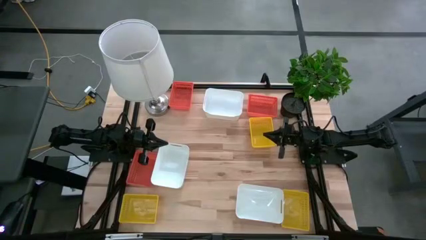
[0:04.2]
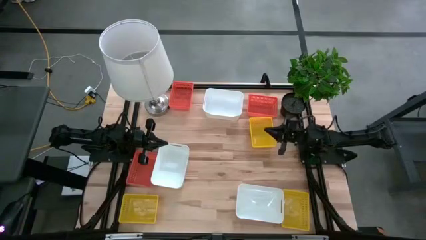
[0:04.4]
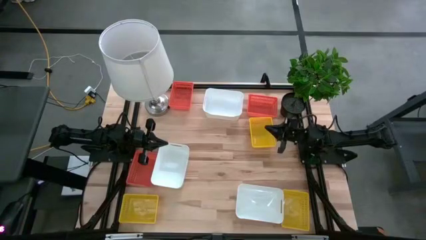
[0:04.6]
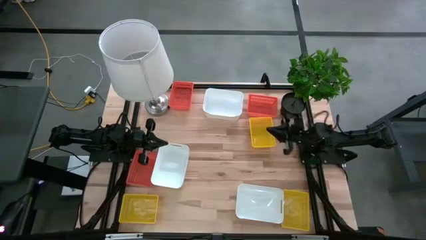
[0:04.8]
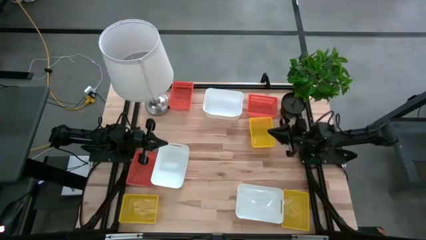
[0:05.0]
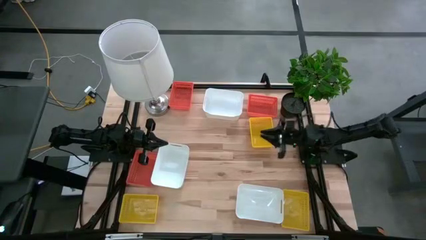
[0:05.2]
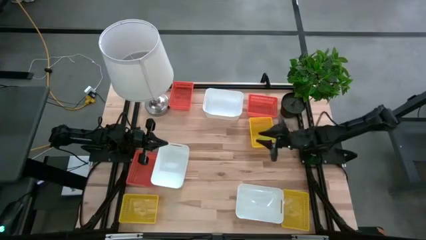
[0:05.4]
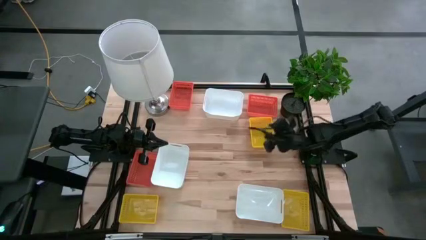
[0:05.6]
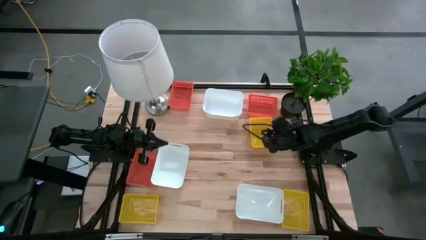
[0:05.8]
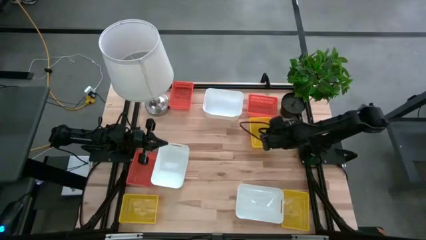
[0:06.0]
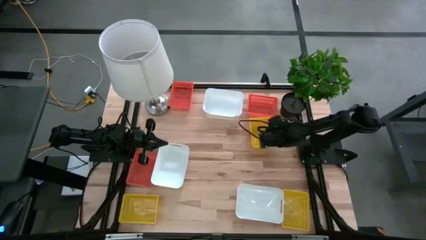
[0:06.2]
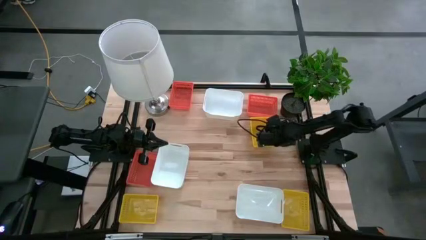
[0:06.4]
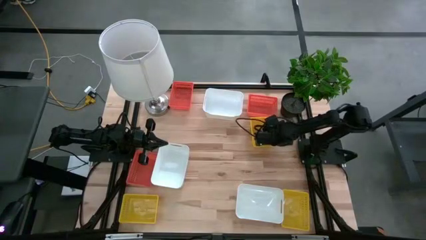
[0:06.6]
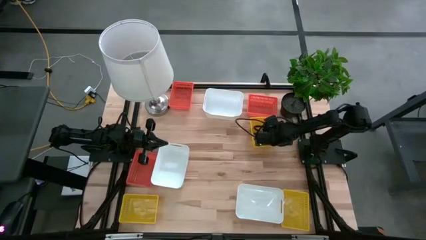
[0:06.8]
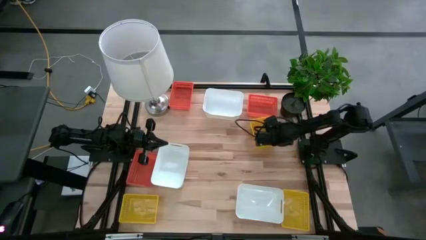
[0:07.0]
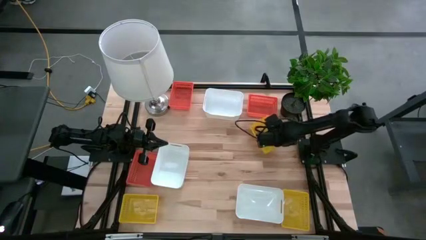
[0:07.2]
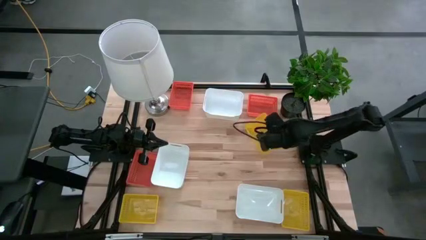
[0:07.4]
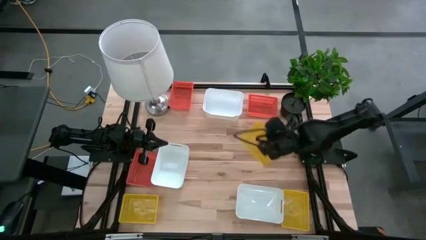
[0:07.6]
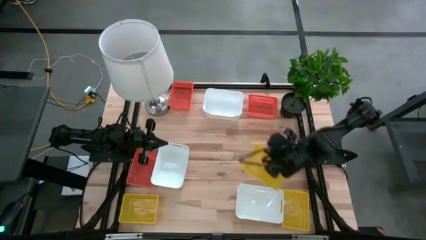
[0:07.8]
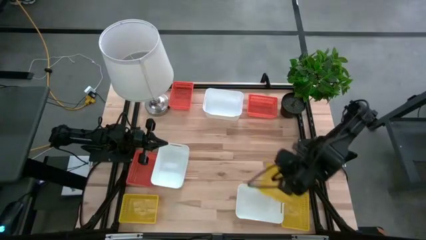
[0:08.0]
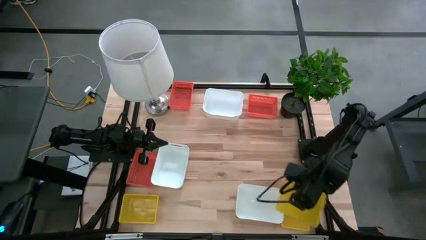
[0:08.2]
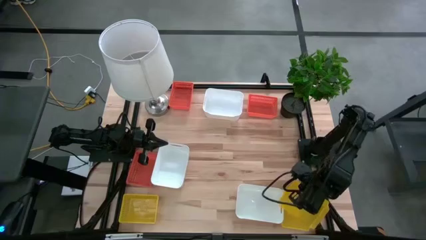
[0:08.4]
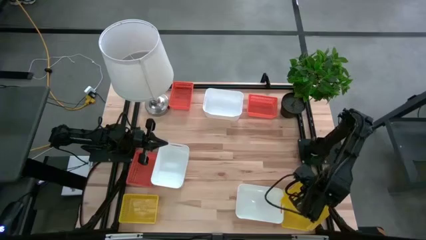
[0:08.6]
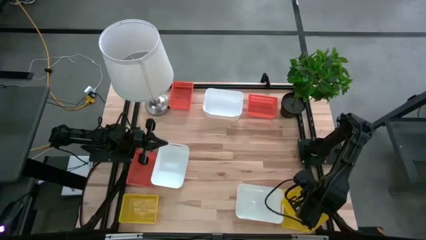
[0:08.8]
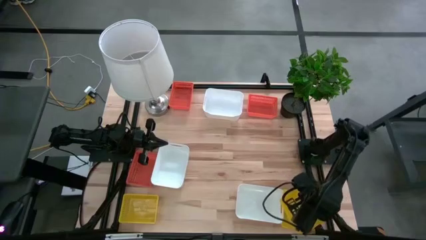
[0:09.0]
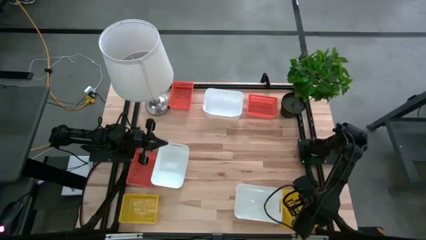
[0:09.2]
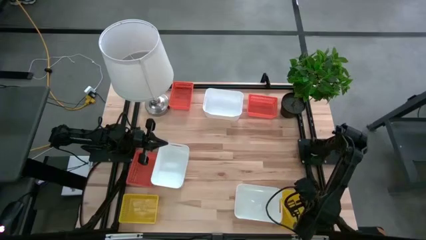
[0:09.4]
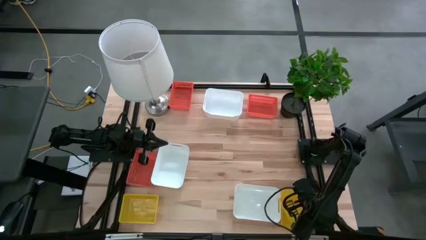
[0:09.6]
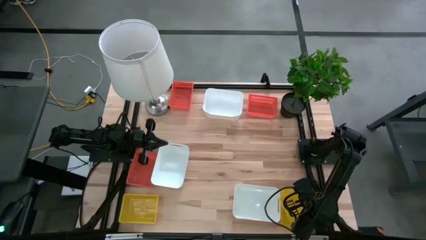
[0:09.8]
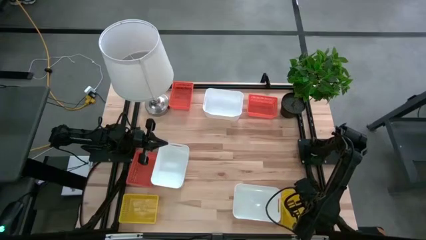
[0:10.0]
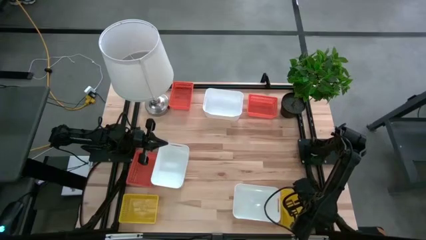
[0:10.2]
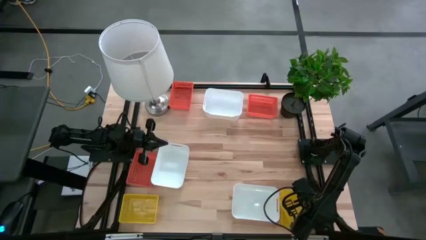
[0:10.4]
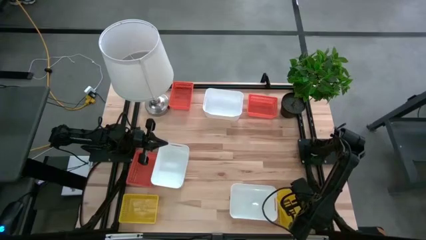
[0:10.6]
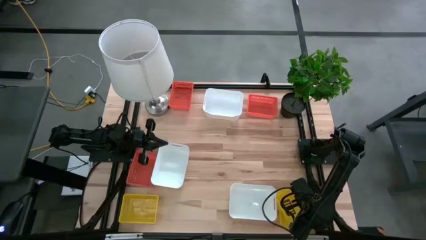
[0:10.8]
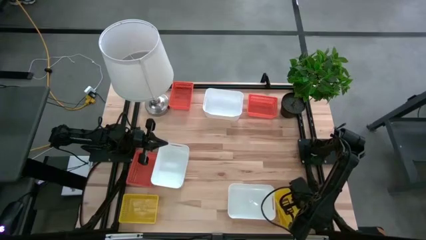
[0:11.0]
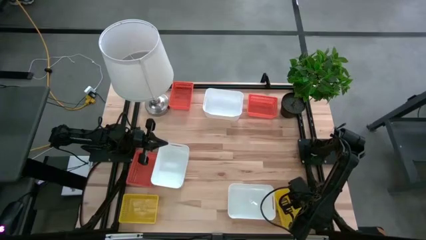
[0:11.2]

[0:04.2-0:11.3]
Stack the top yellow bin on the bottom right yellow bin

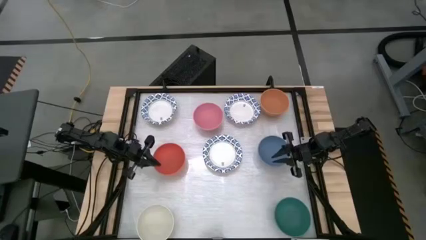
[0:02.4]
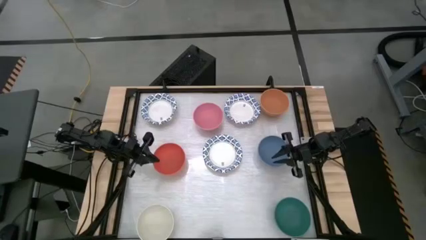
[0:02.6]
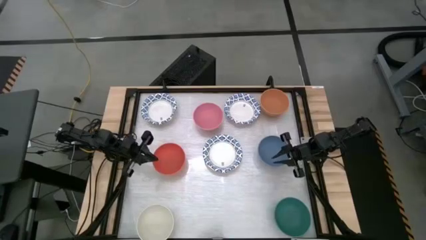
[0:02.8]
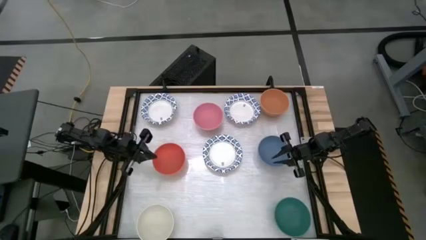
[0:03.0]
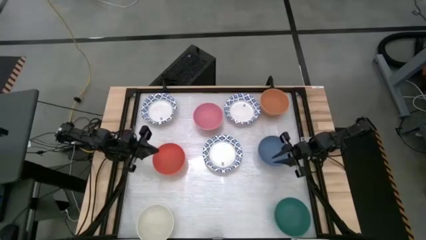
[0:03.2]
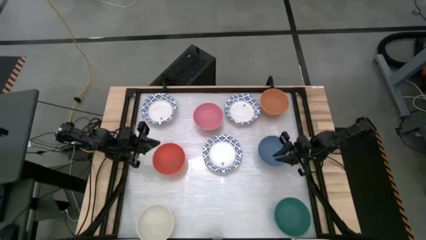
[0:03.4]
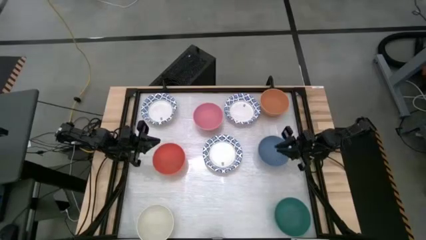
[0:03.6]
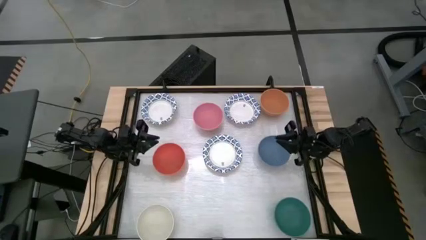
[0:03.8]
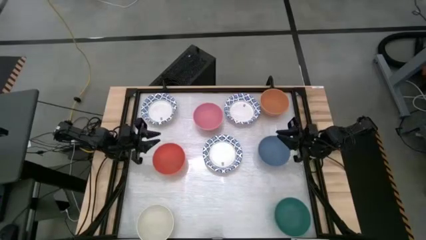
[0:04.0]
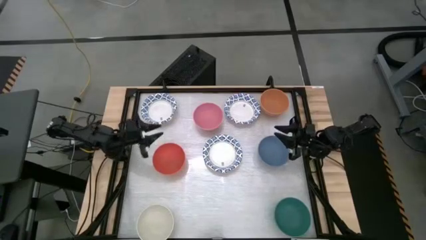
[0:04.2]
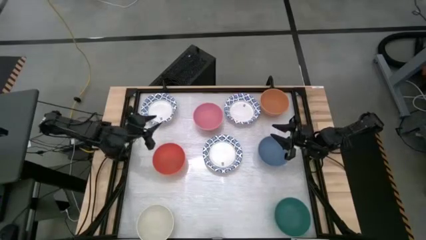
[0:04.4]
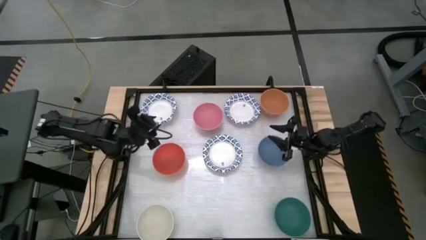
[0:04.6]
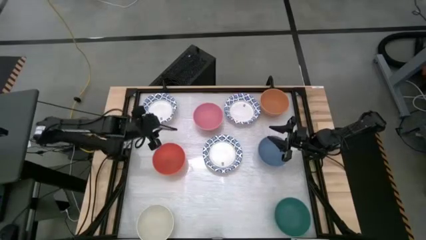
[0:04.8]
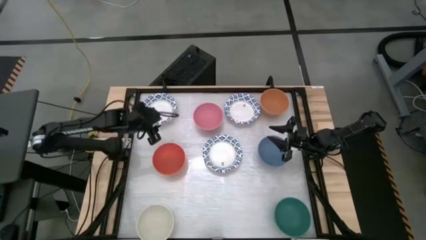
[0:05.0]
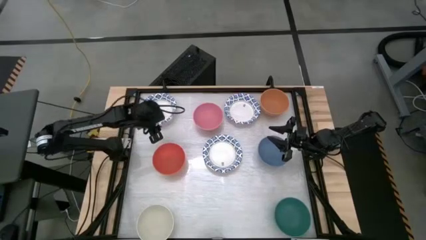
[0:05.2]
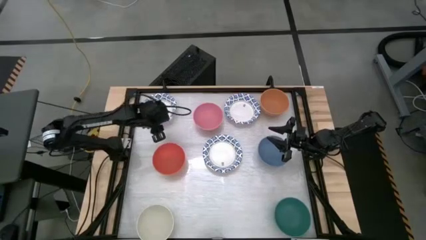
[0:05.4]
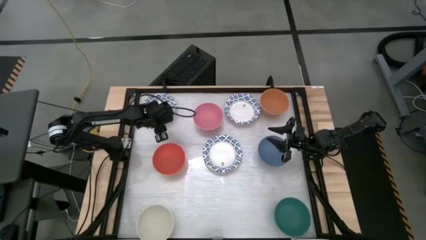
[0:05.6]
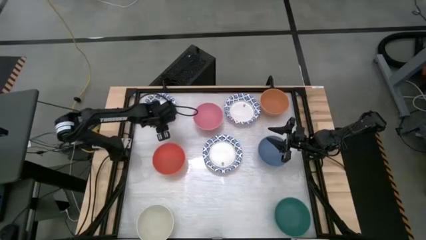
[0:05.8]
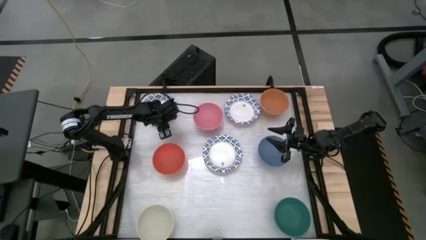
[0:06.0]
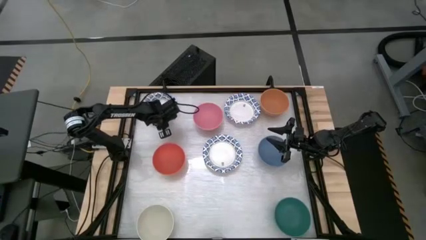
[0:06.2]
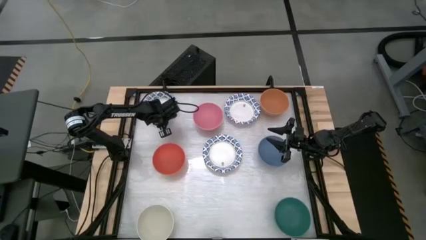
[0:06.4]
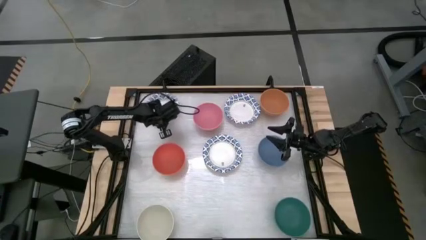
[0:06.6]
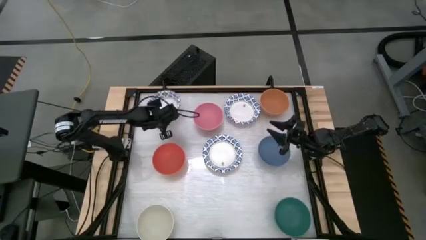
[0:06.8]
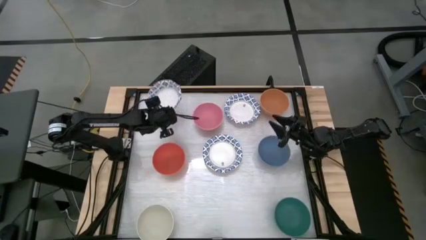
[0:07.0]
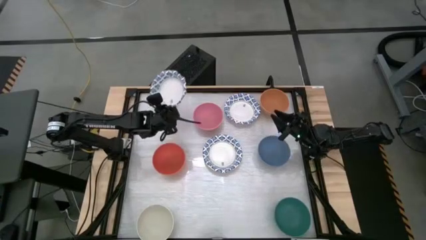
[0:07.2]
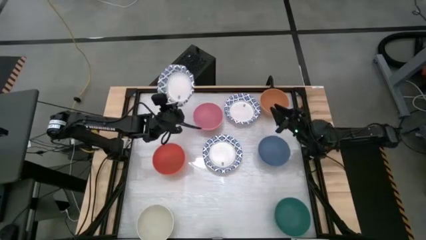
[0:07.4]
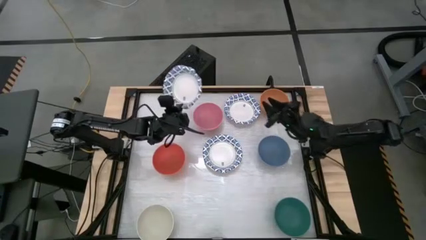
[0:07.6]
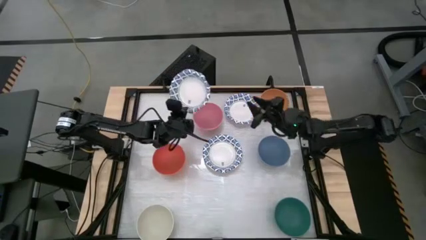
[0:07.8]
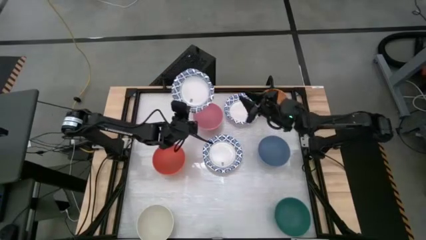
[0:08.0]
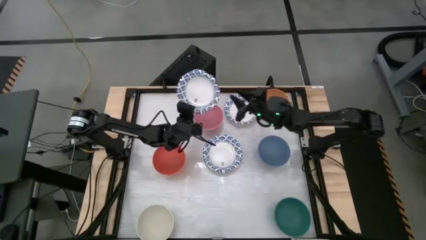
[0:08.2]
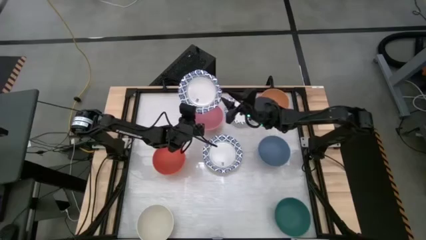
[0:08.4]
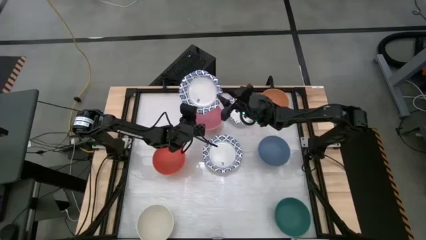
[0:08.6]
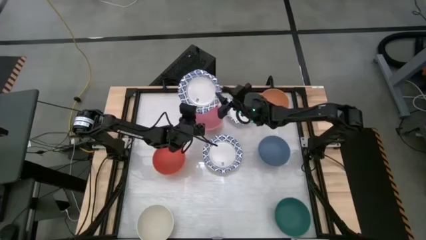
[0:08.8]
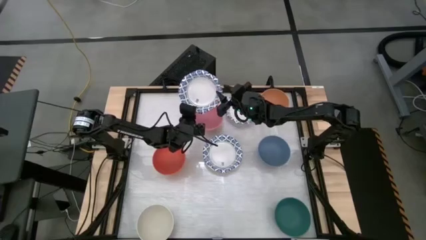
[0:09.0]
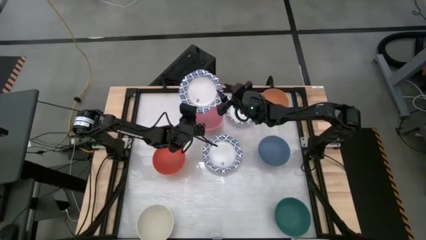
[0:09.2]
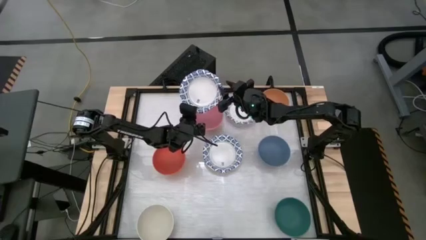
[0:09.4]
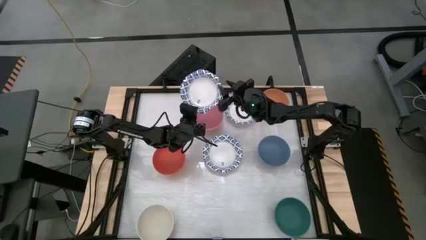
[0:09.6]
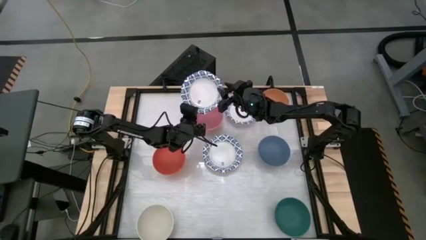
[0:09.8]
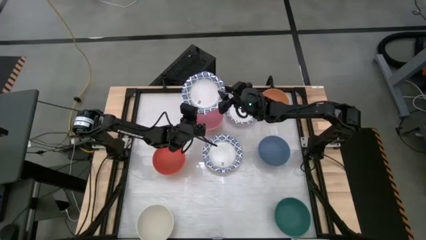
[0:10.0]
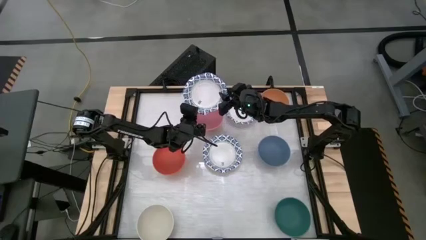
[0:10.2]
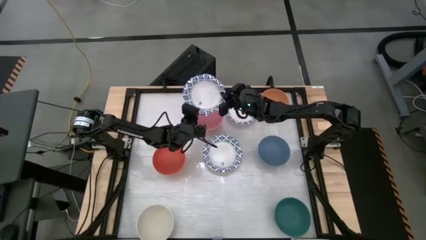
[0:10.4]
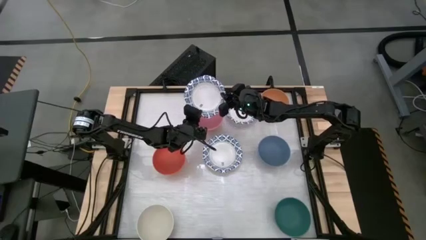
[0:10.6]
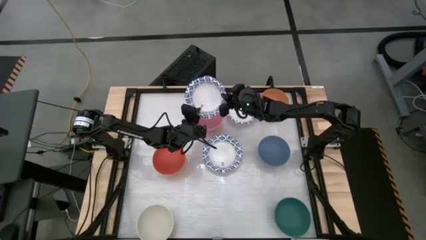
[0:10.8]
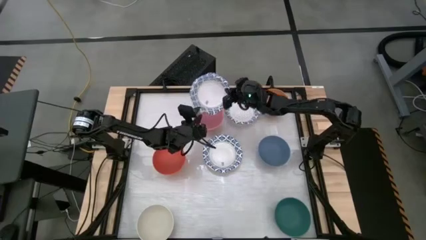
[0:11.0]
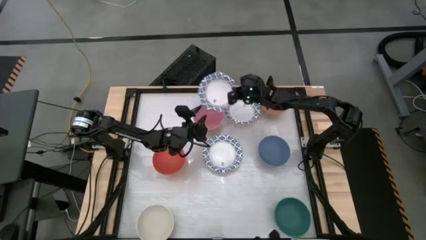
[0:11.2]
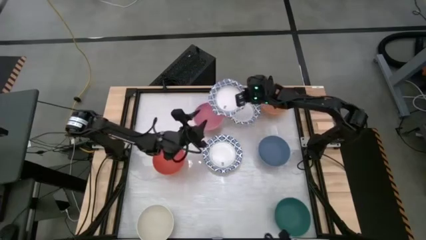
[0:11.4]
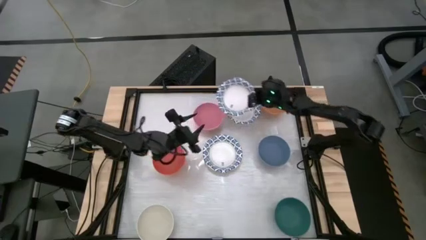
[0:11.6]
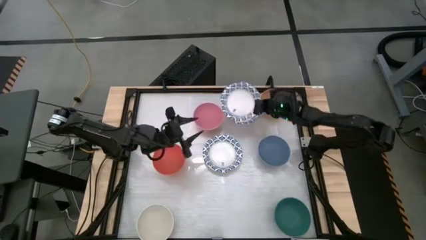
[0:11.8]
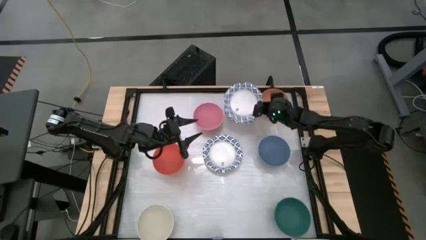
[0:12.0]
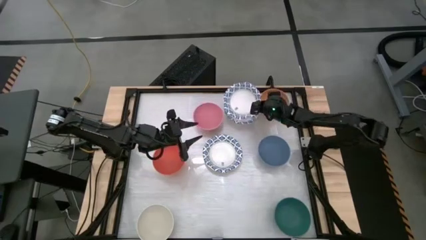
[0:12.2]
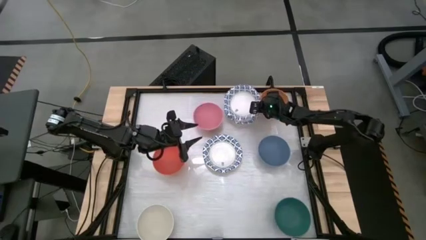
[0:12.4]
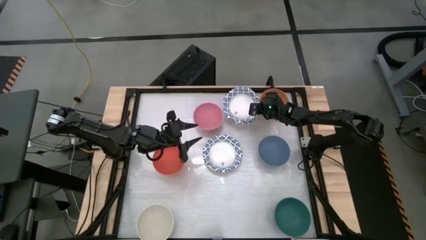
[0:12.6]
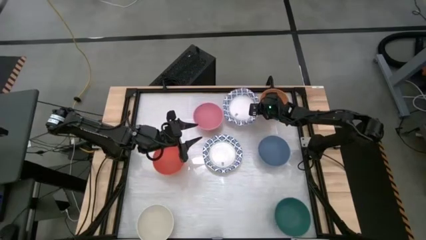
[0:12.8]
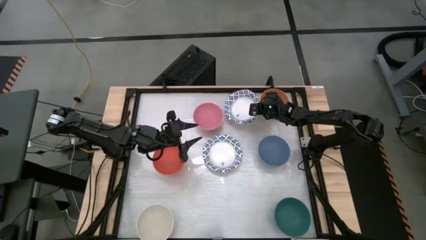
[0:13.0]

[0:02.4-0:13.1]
Stack the top left white paper bowl into the top right white paper bowl
